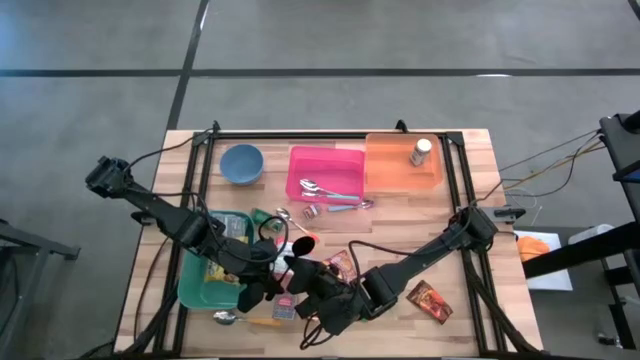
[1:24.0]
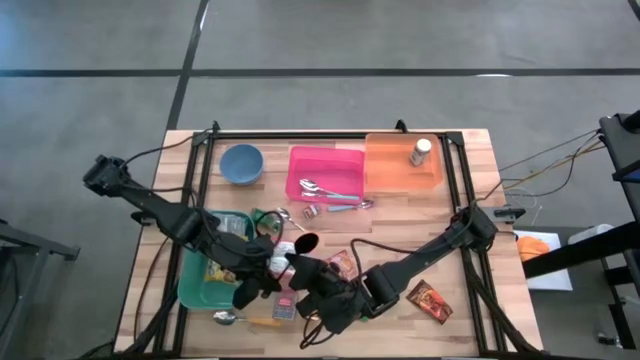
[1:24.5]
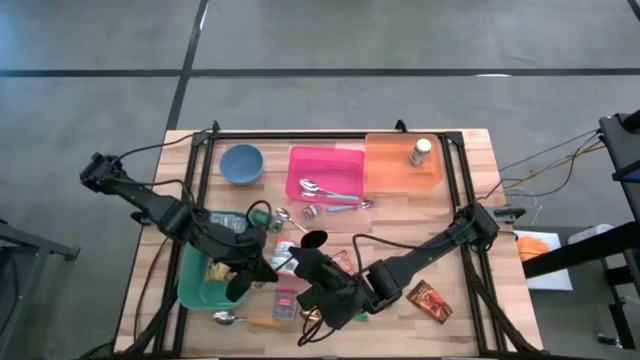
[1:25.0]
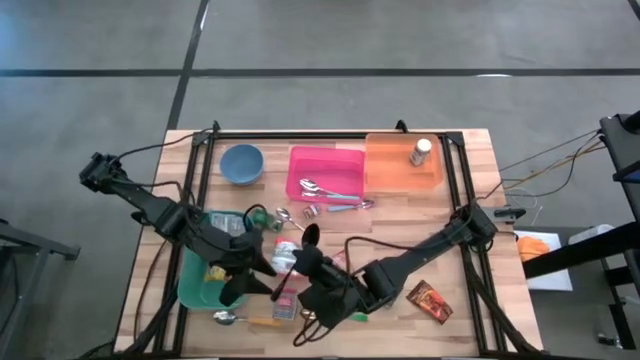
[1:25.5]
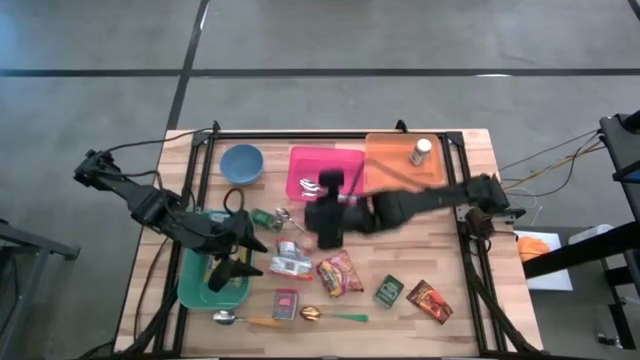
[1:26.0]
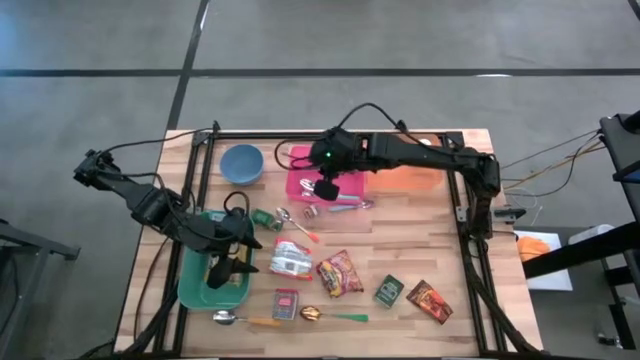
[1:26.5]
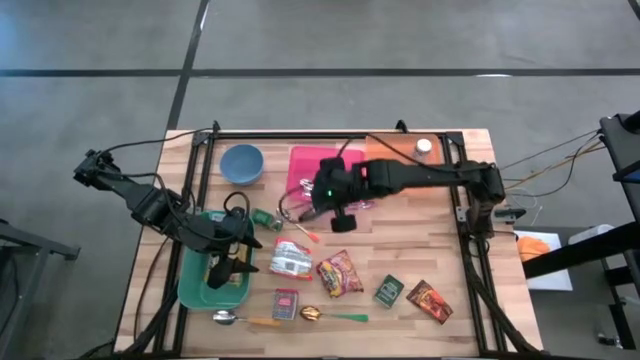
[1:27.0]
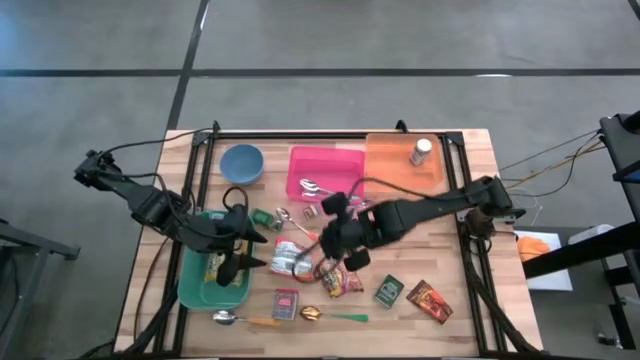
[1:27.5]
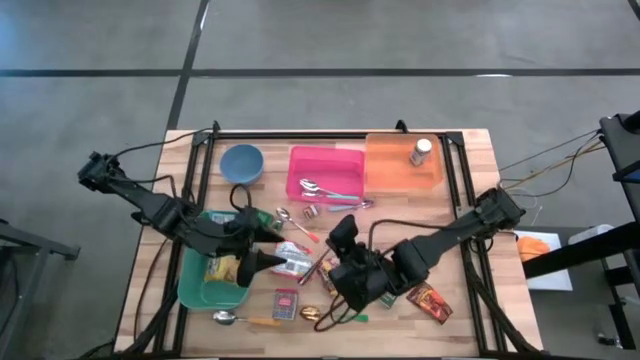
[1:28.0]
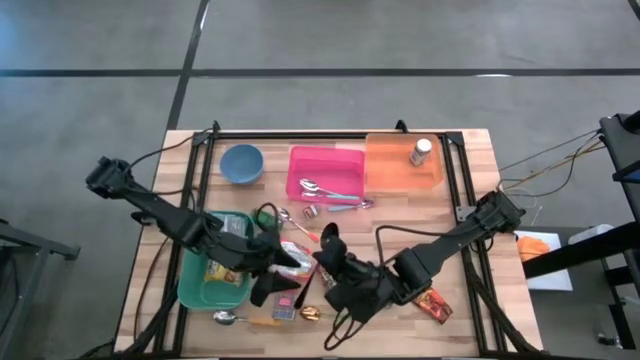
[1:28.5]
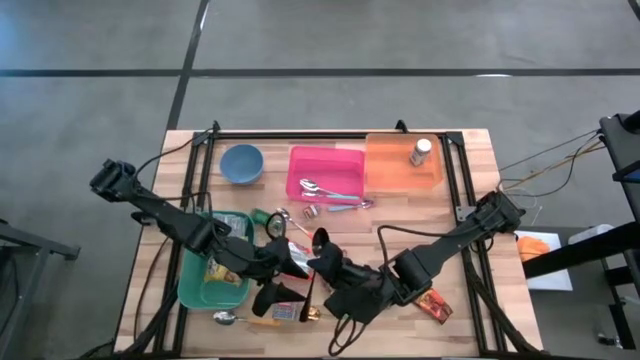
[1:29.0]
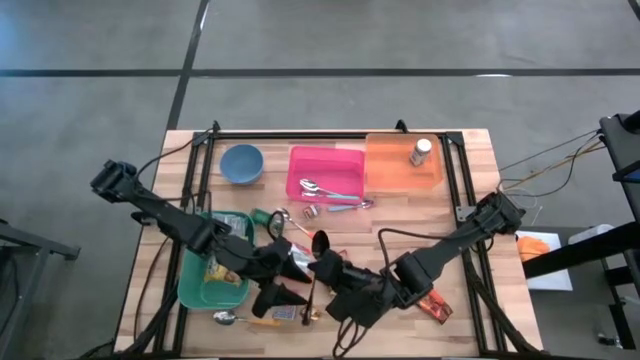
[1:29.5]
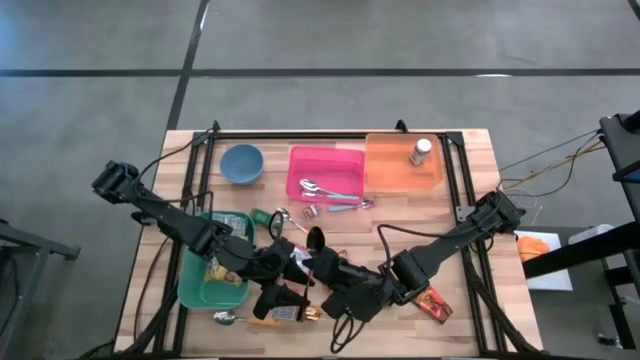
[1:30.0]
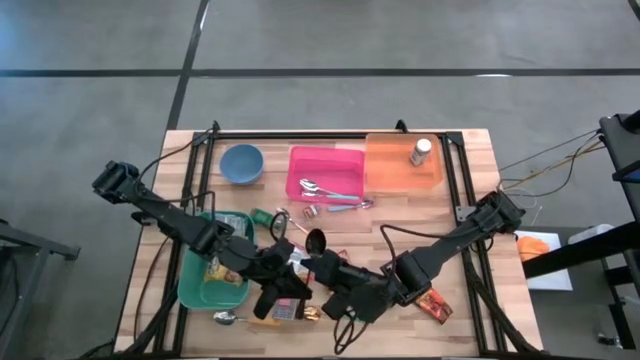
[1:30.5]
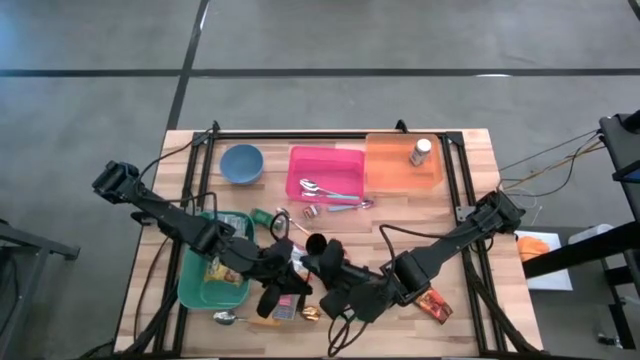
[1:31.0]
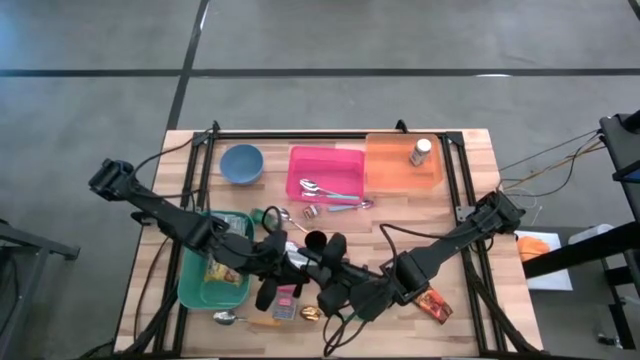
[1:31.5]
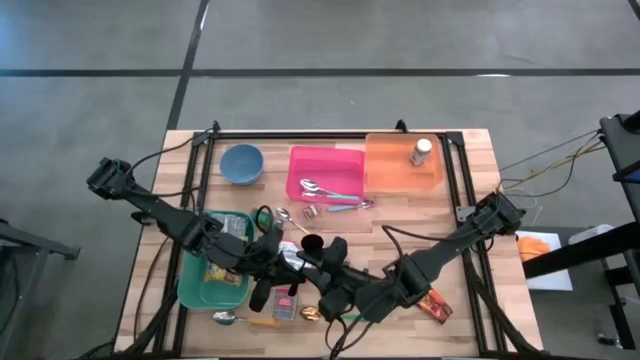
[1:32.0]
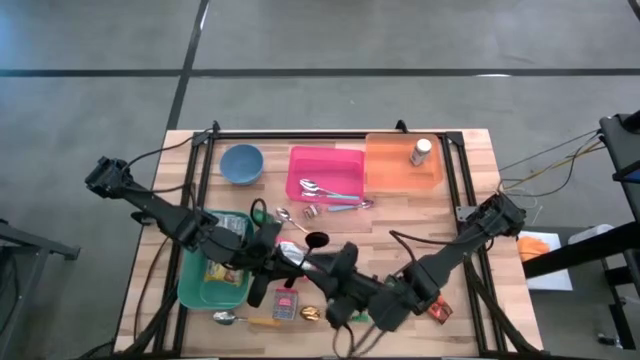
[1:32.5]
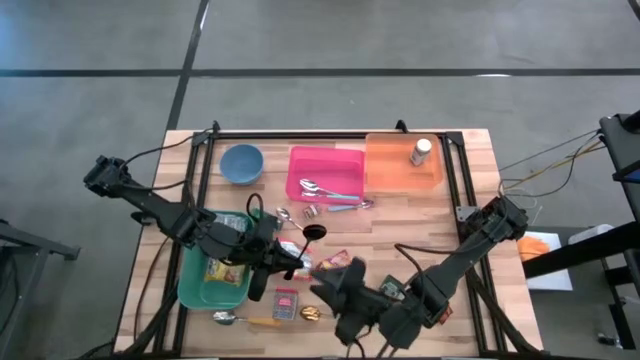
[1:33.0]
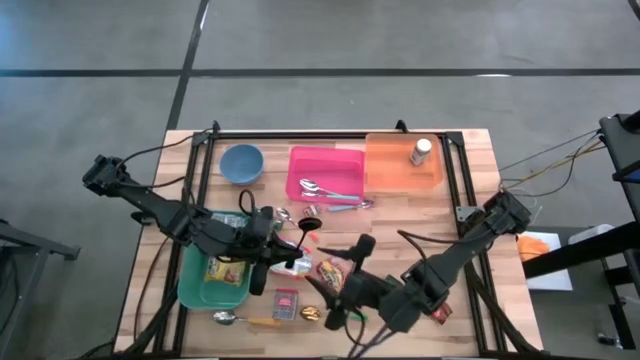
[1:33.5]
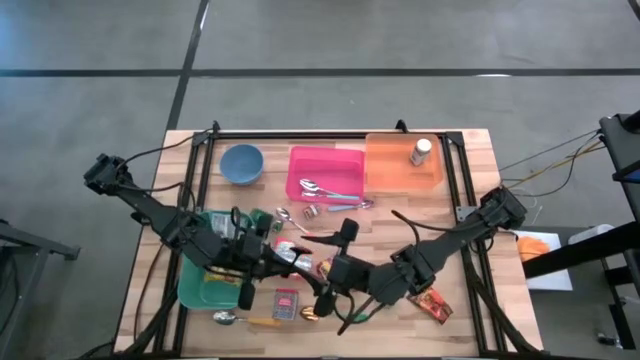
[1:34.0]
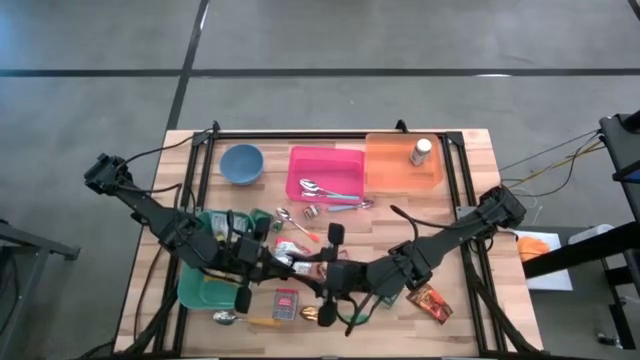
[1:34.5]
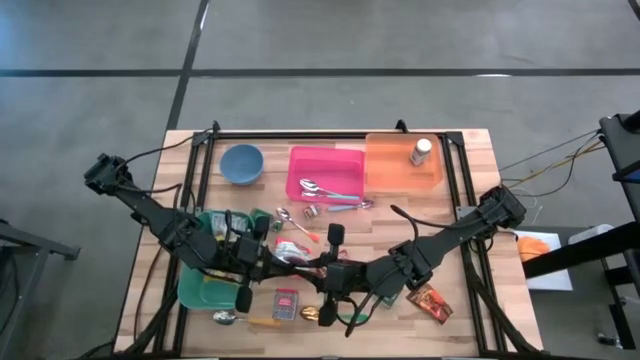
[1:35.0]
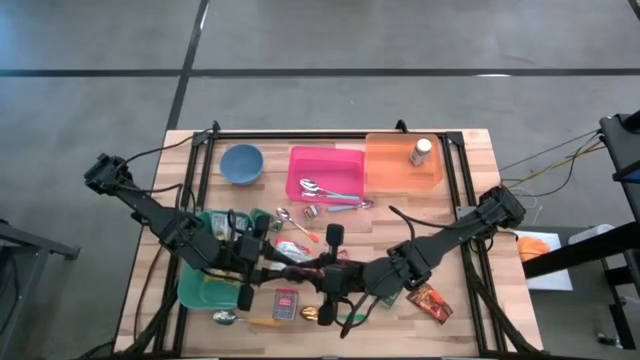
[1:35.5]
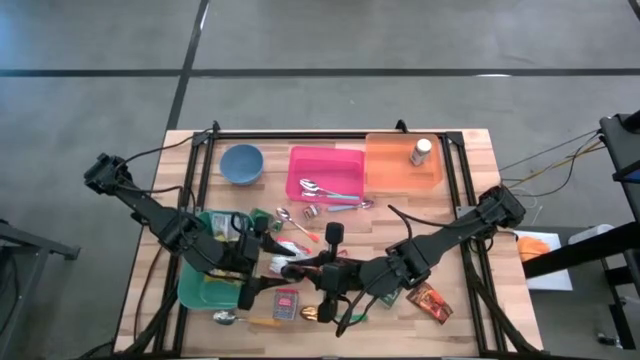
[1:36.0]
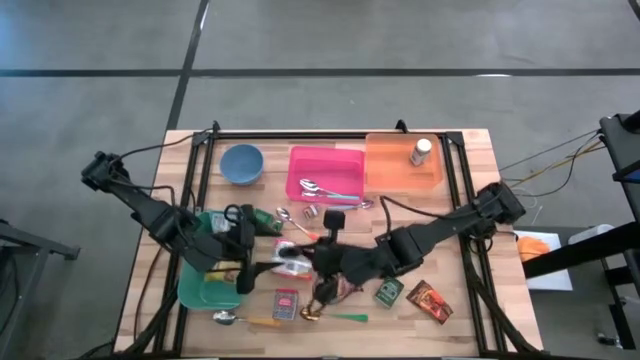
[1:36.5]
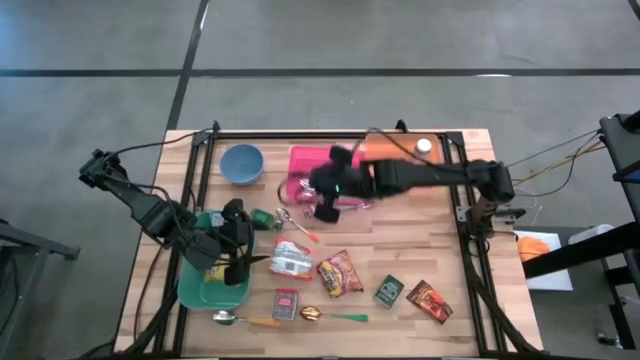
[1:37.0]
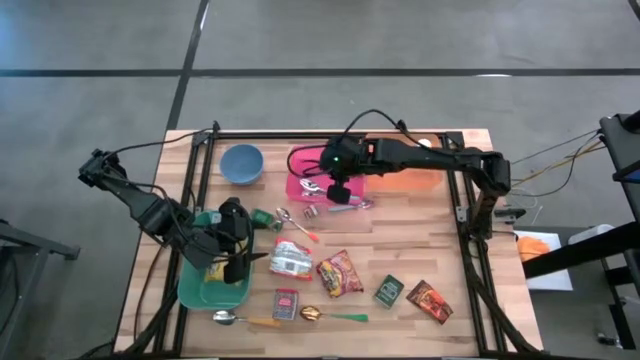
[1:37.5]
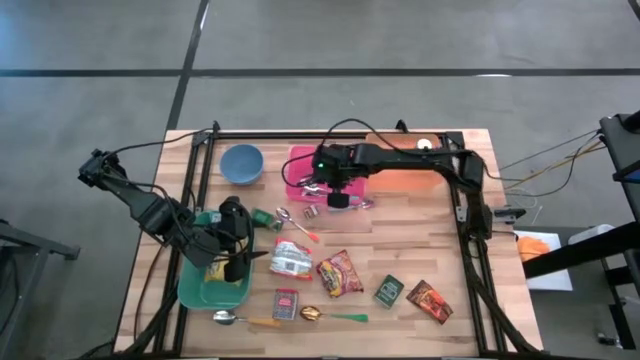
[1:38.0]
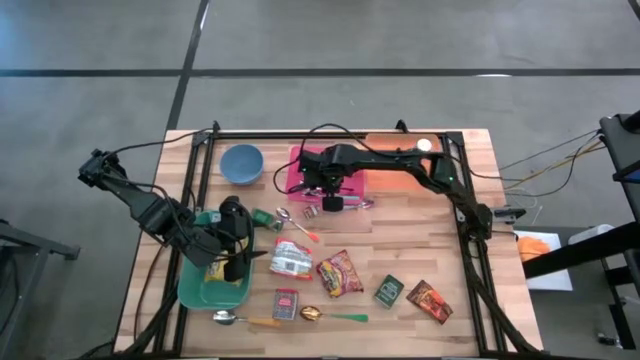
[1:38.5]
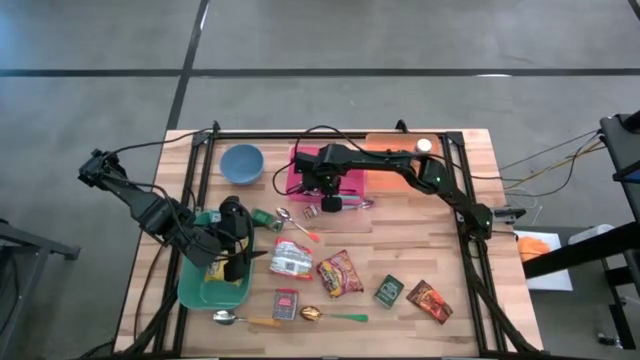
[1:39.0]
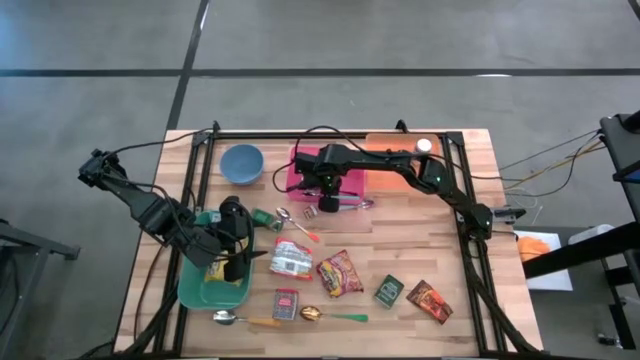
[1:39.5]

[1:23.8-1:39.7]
Put the black spoon into the pink bin

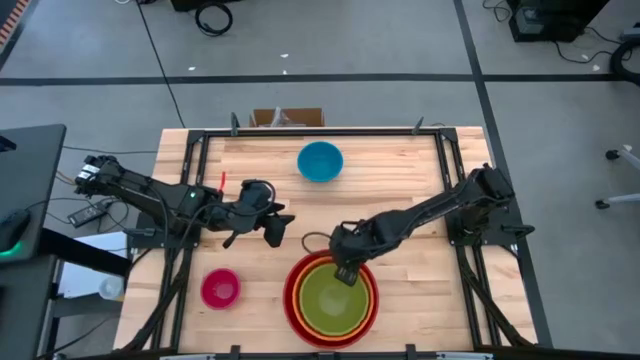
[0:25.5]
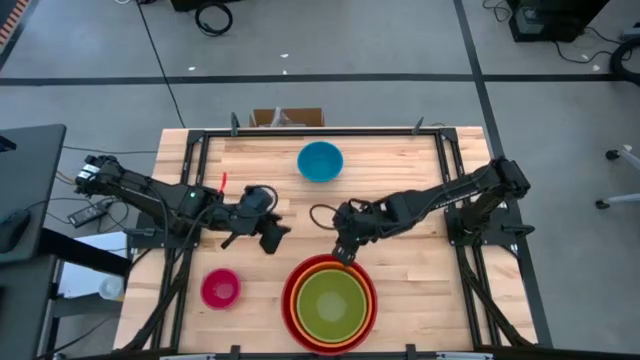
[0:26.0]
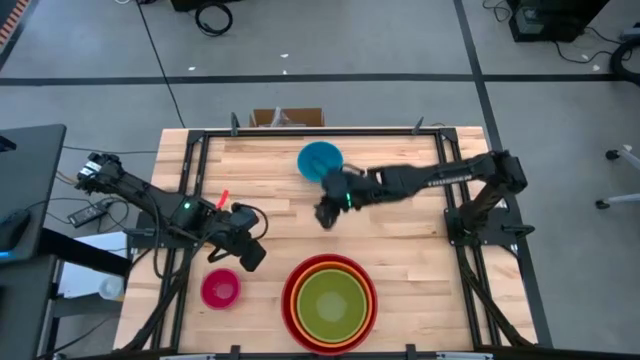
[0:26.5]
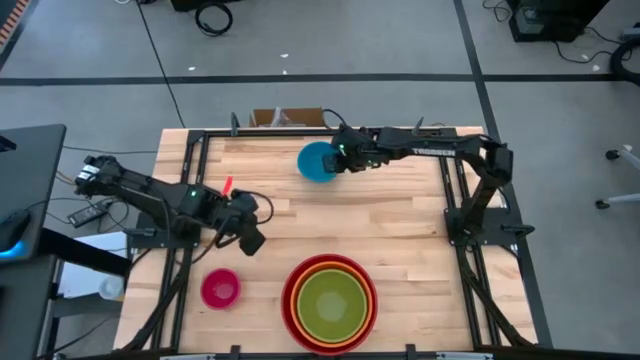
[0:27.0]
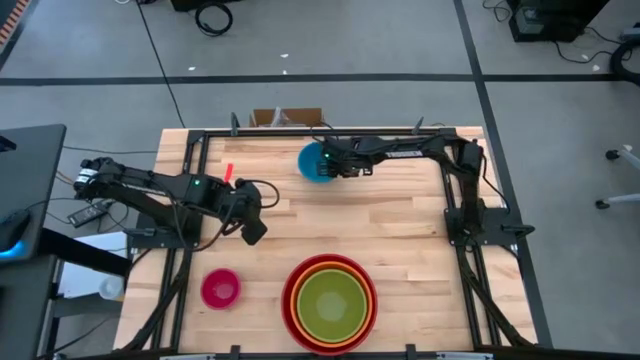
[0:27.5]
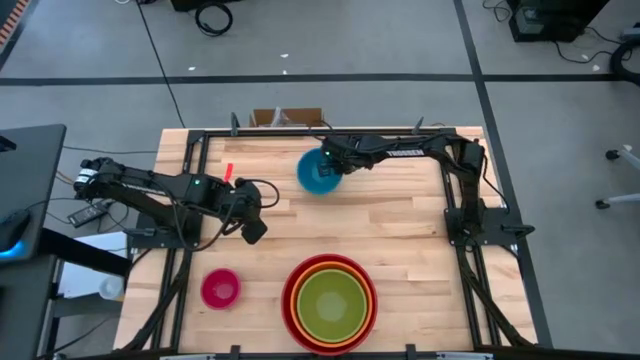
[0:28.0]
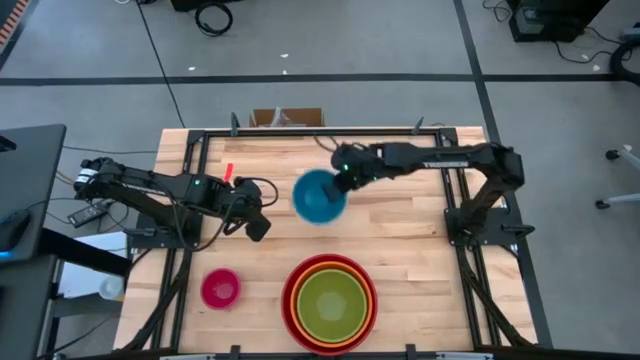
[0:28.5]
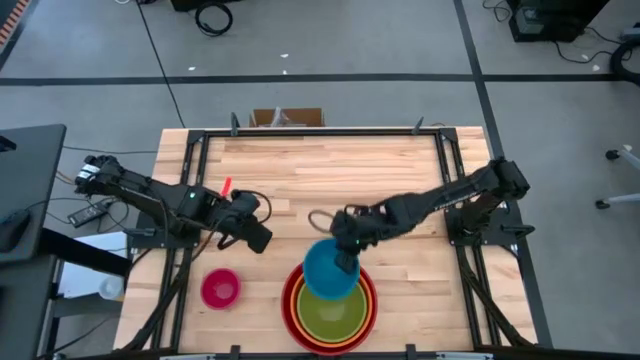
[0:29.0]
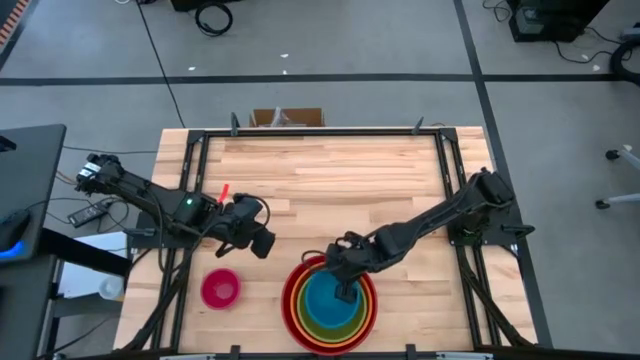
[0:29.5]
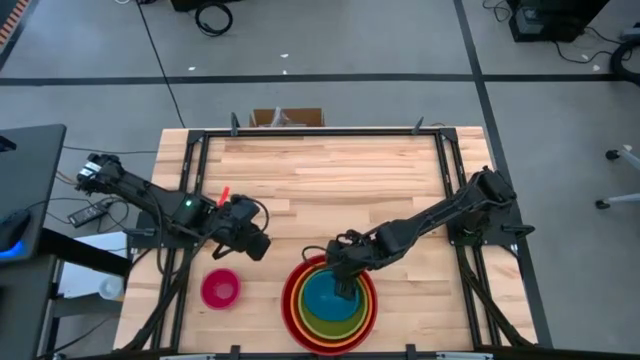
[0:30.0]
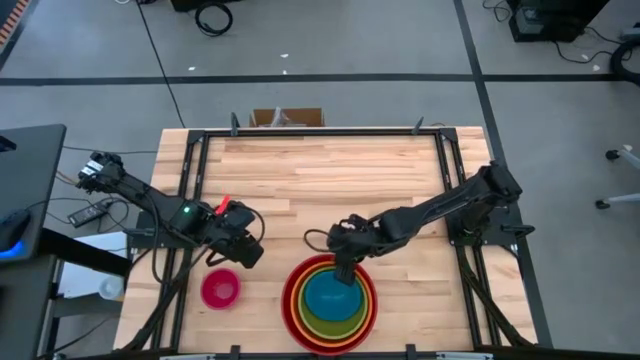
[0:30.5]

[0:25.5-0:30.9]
Stack the blue bowl on top of the green bowl
